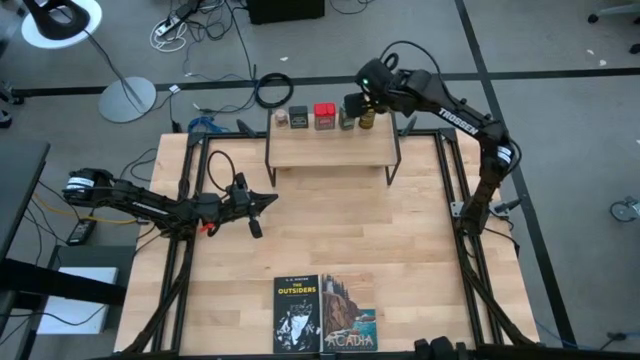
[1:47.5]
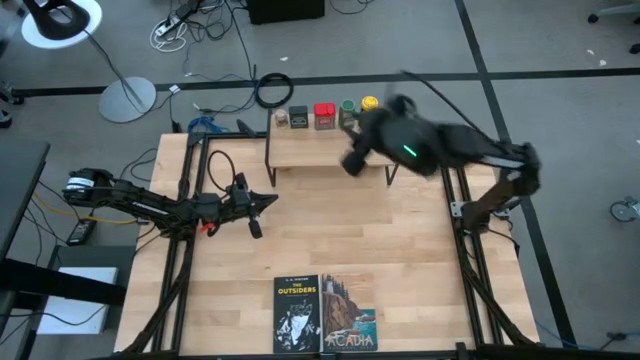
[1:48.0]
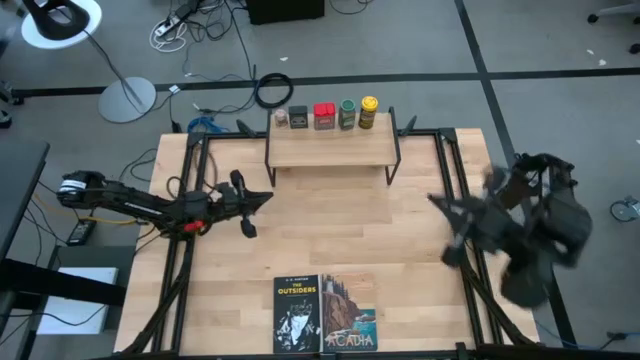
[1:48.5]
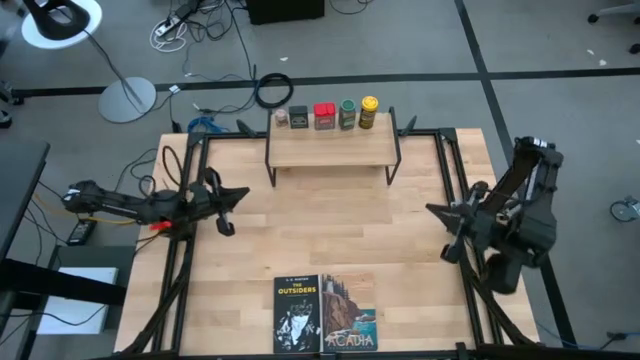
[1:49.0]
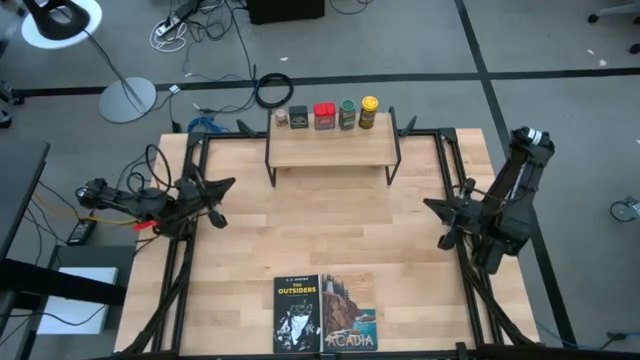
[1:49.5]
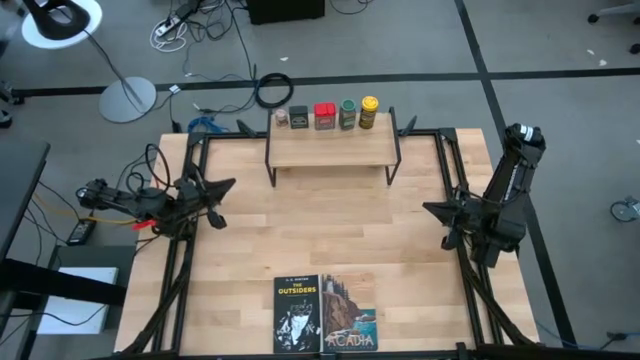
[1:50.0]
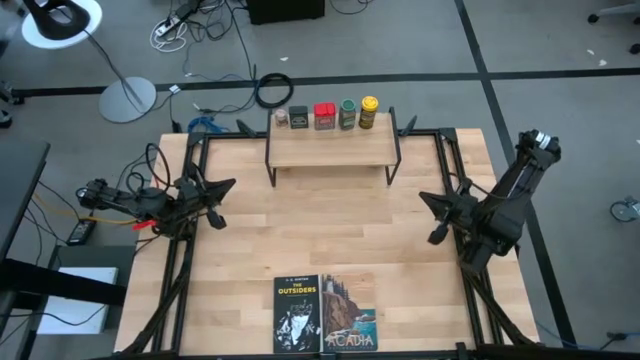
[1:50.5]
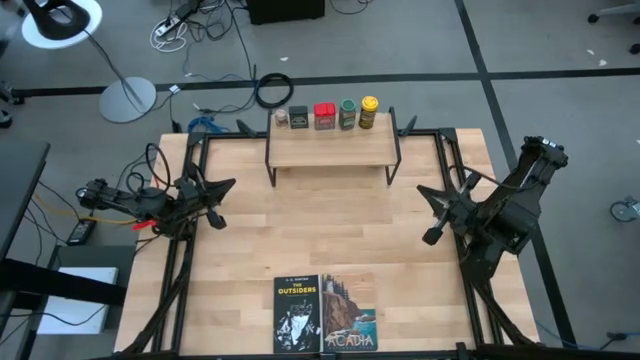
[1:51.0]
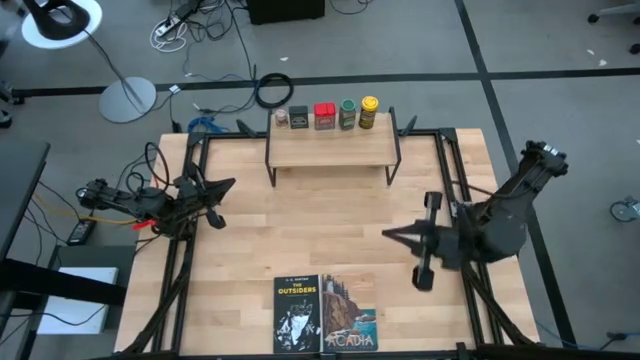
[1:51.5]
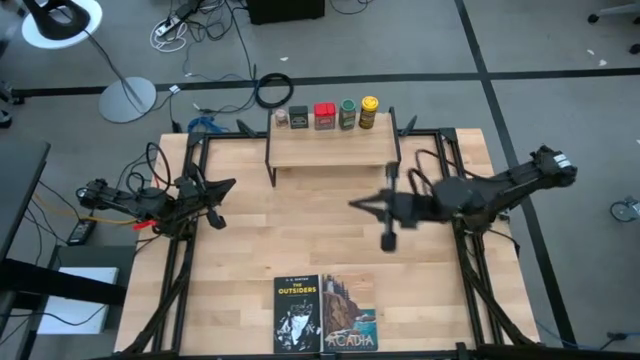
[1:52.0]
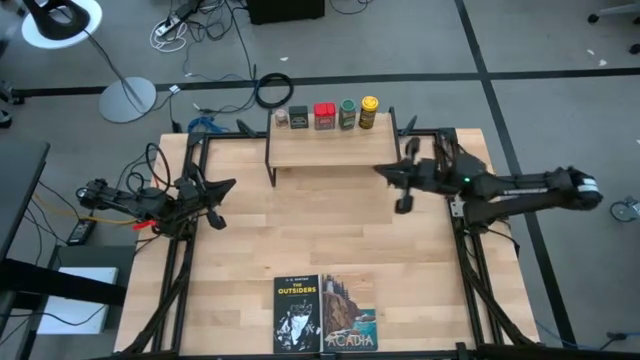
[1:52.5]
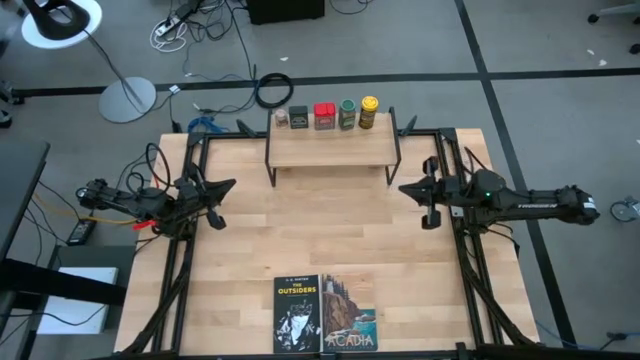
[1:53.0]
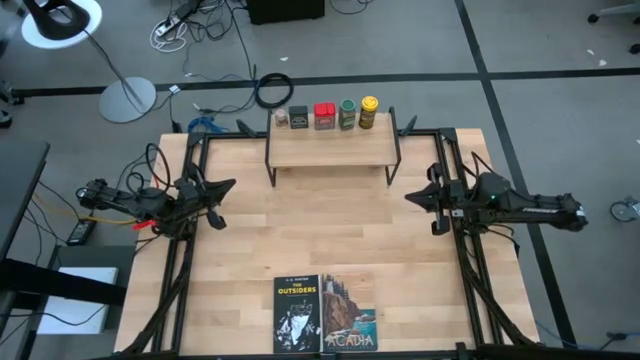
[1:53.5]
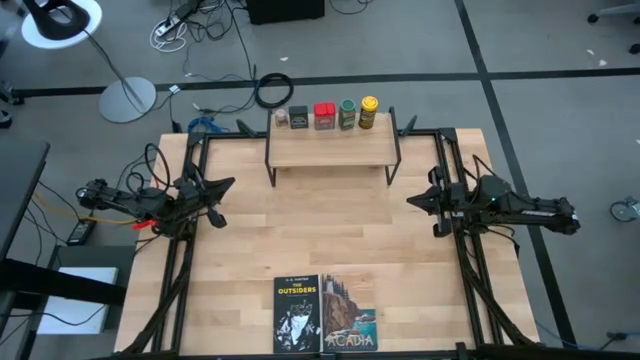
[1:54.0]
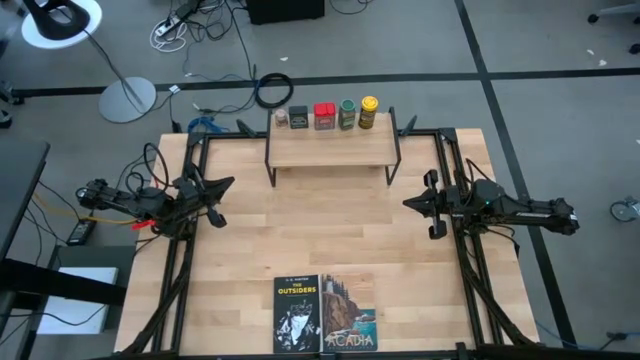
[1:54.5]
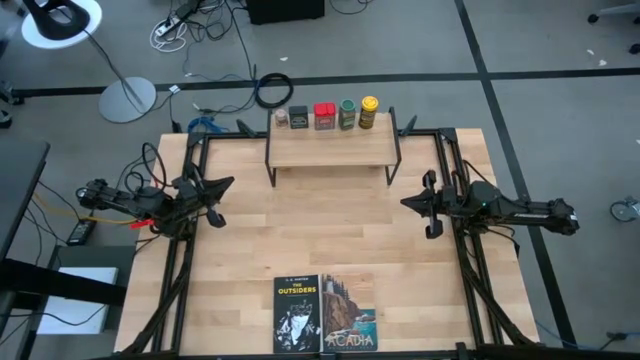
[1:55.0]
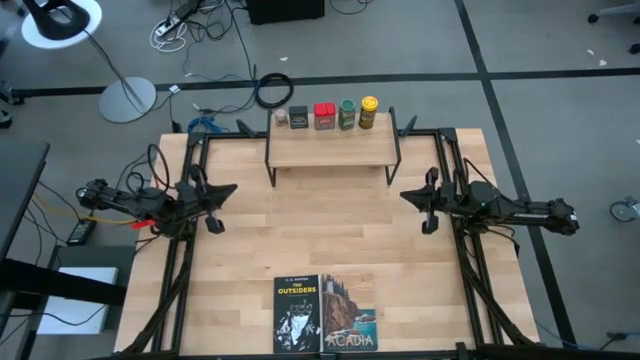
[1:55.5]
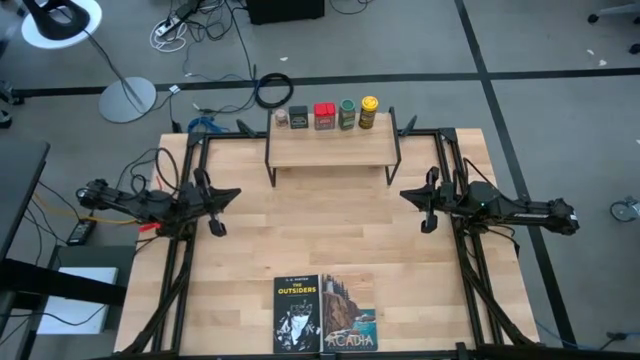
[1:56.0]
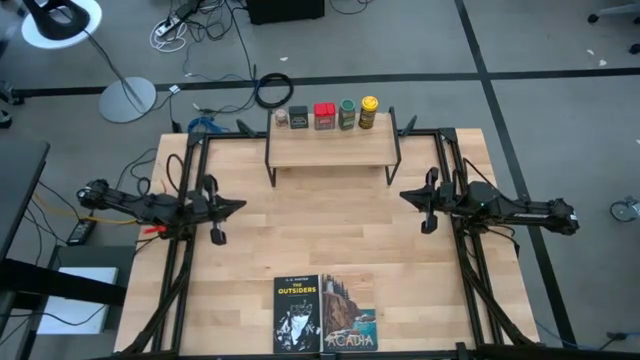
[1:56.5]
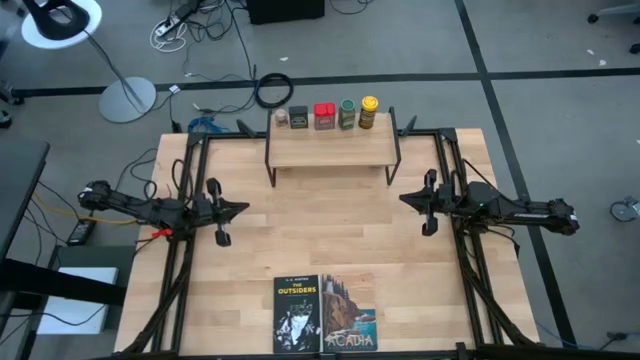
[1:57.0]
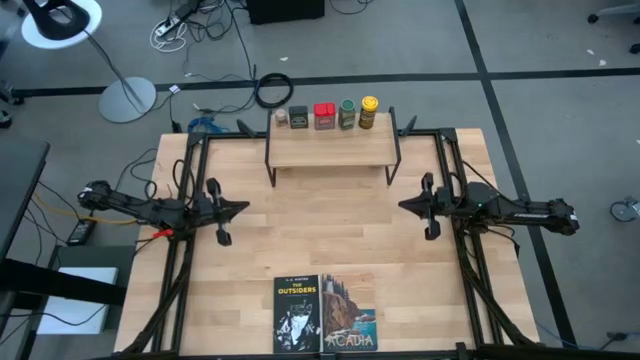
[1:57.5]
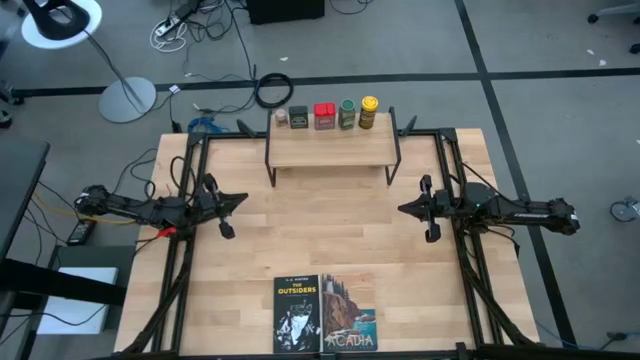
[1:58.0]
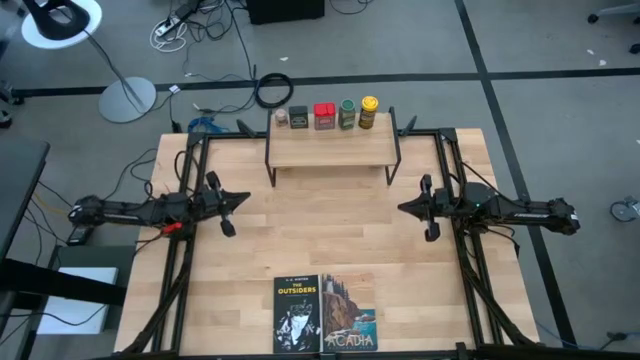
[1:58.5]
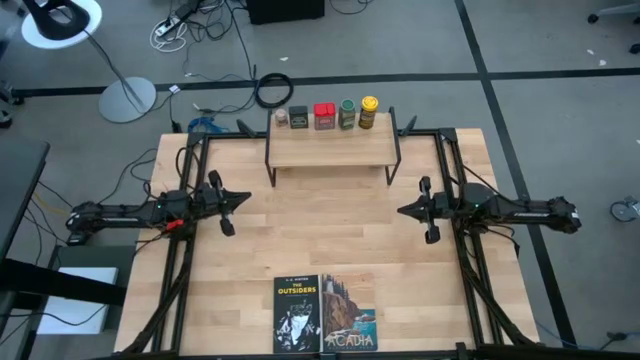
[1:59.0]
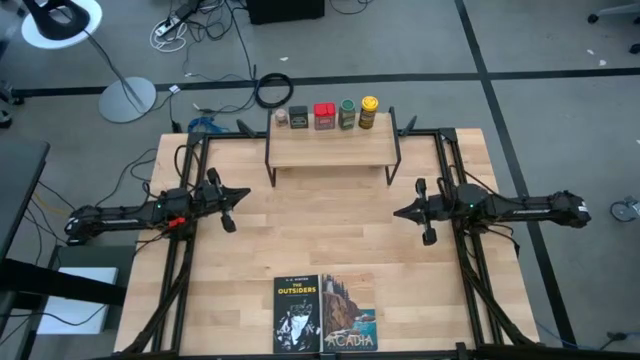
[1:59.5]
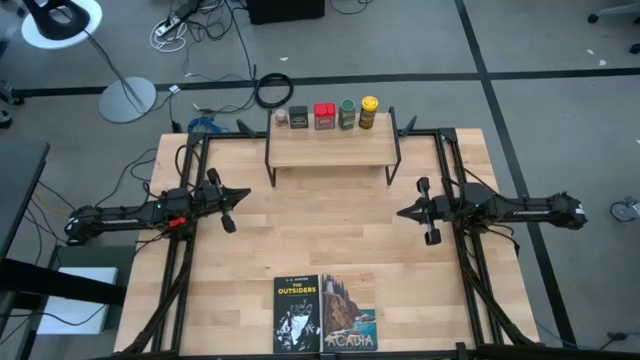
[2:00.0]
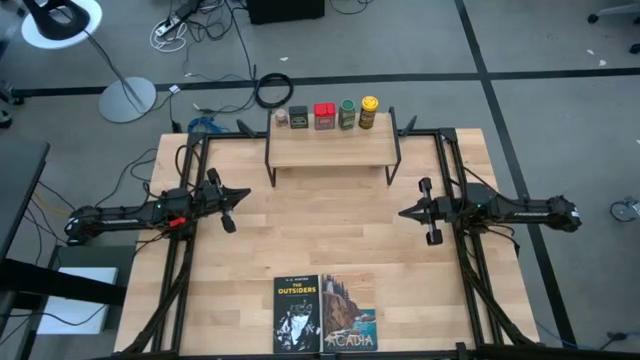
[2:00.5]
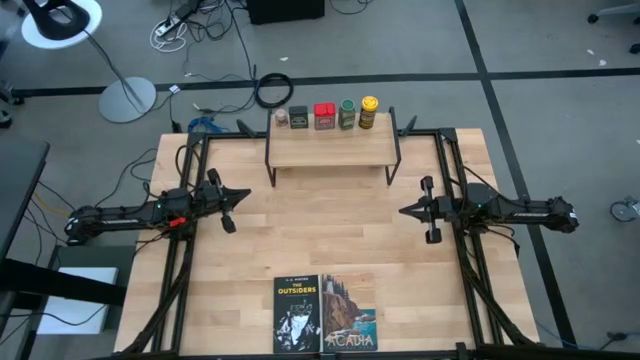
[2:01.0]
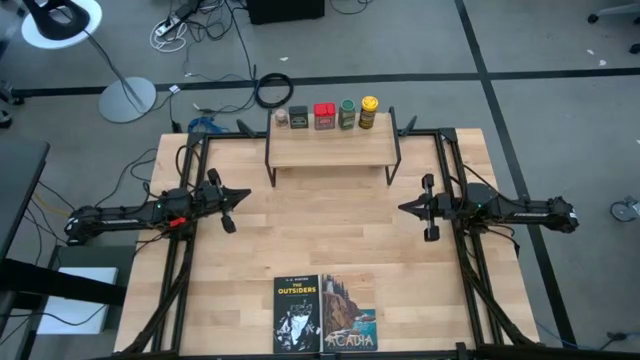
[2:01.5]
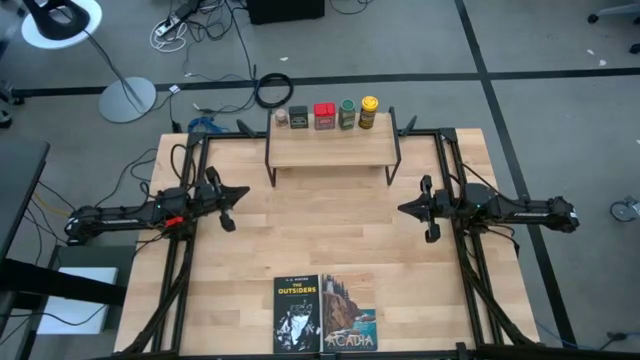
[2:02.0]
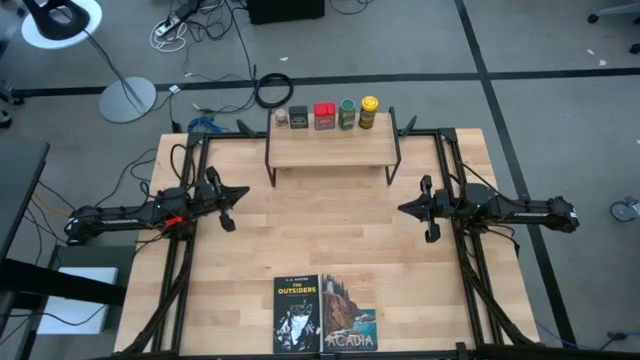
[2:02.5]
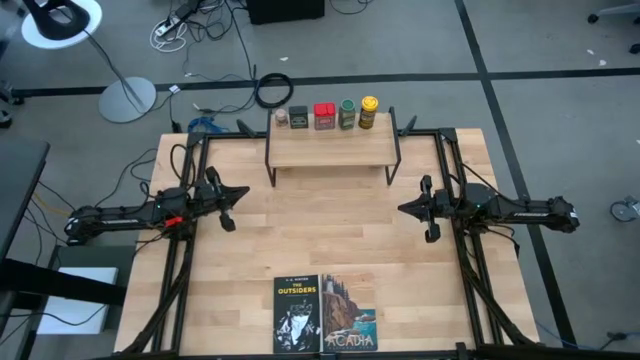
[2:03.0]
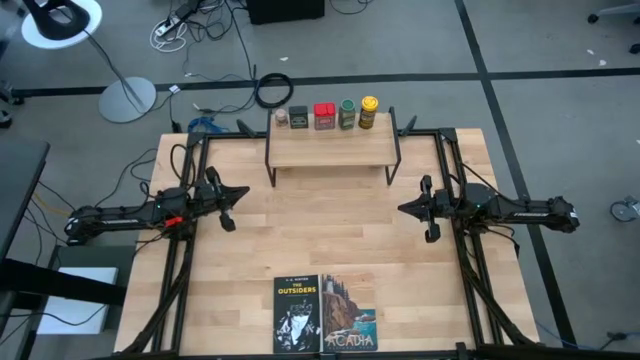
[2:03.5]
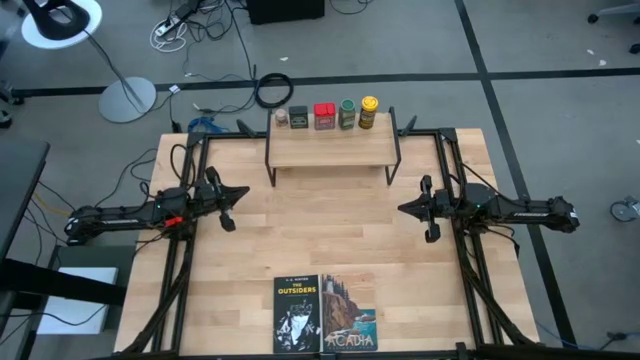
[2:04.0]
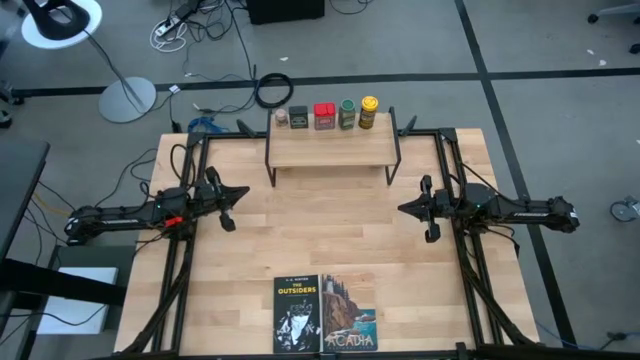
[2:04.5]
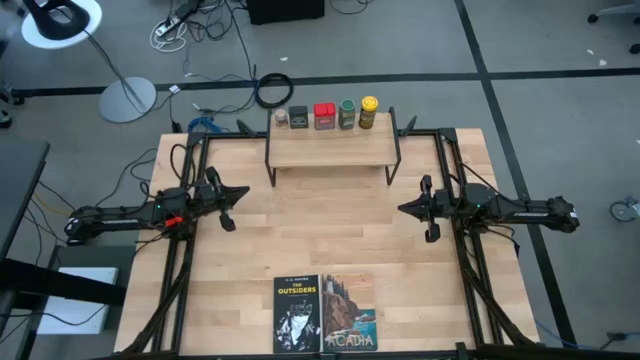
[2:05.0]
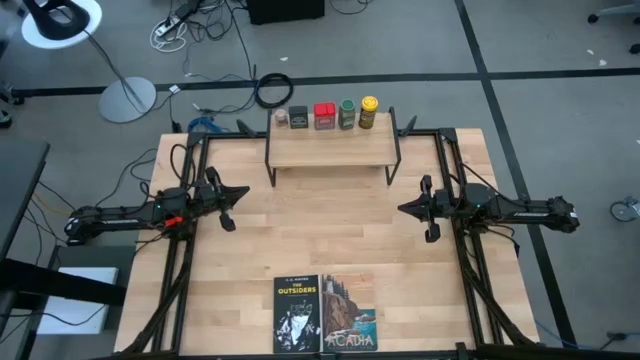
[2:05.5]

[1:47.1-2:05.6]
Task: Shelf spices
Return to Home Position

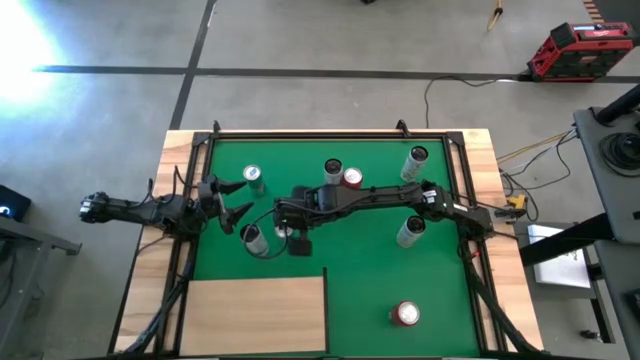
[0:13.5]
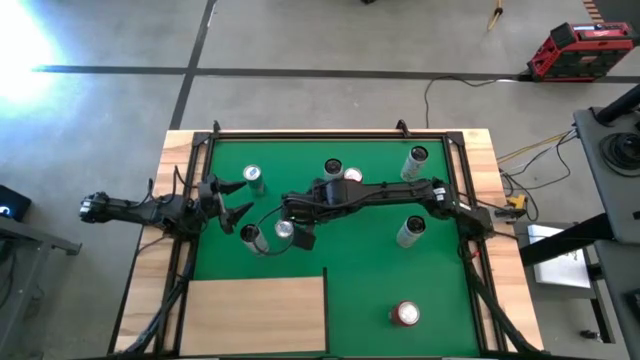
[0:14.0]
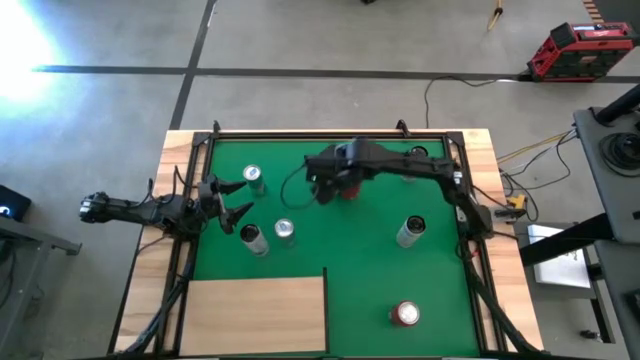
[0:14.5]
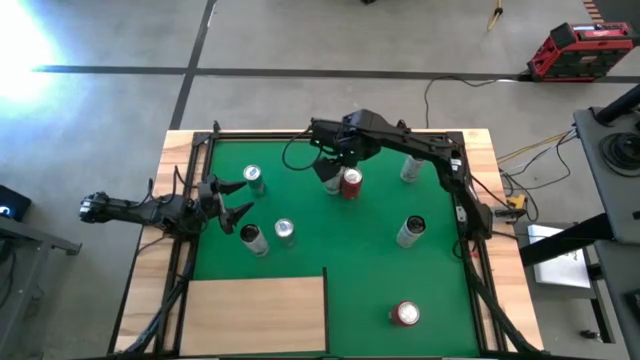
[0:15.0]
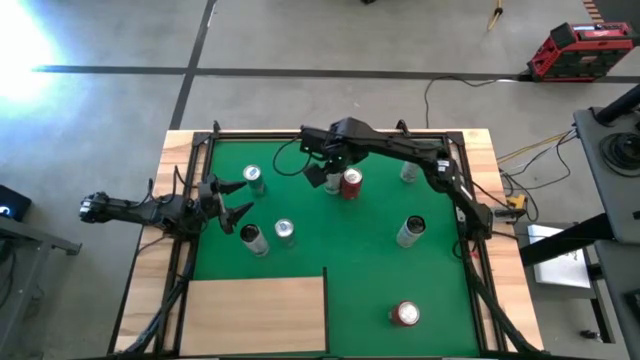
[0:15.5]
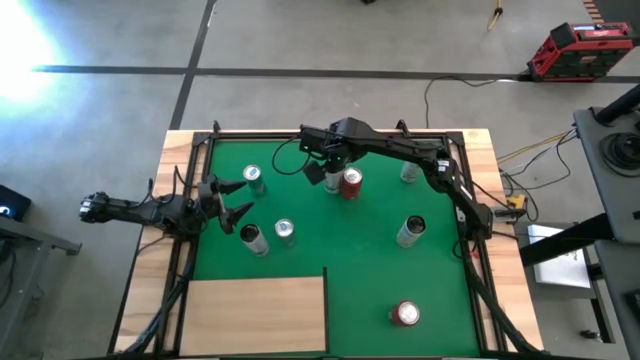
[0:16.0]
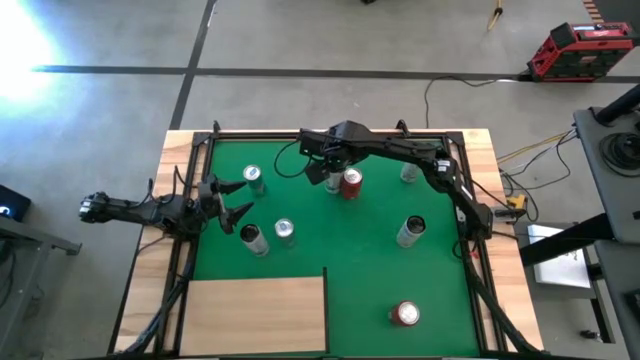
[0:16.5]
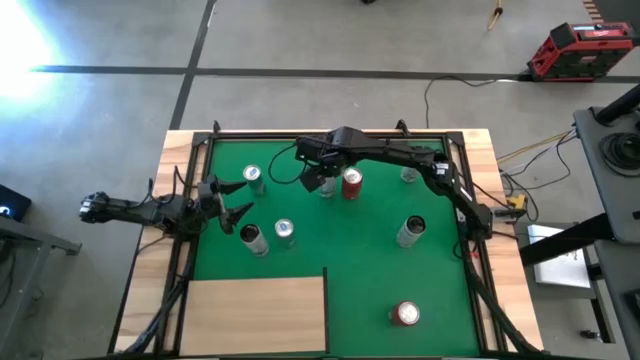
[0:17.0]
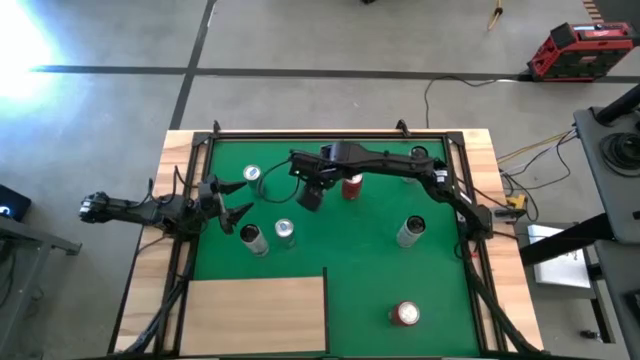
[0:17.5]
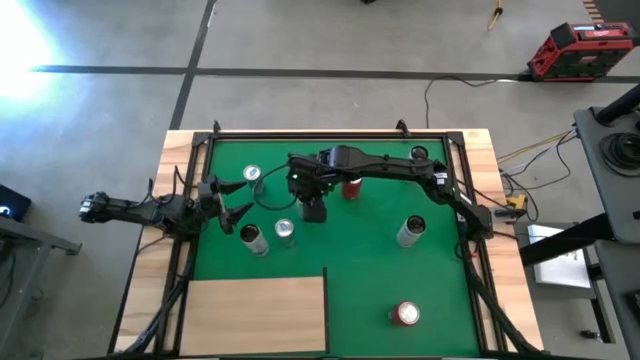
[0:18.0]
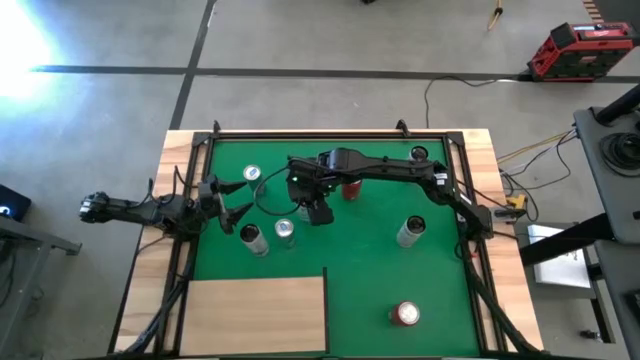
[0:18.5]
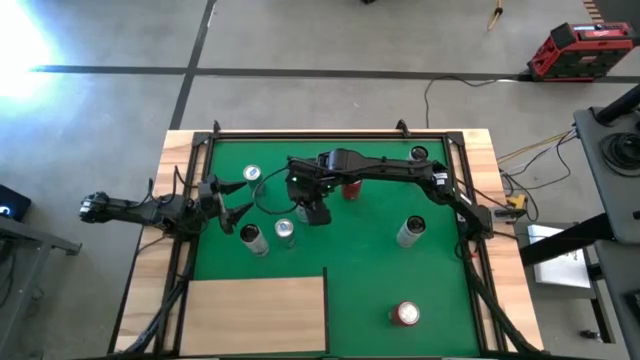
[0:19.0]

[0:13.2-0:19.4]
Task: Place canned beverage on shelf
Move the top white and blue soda can to the center of the table
